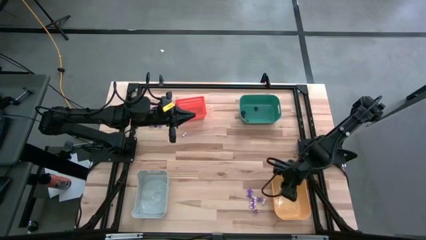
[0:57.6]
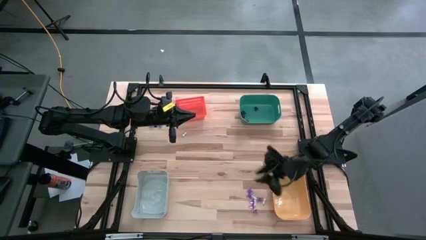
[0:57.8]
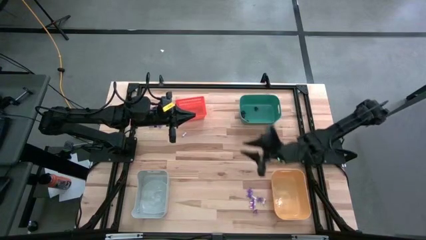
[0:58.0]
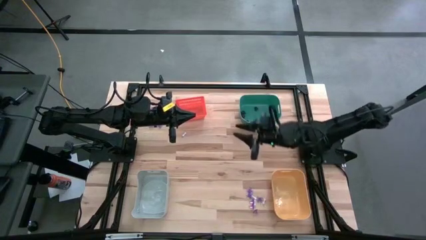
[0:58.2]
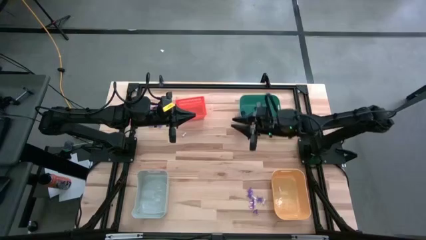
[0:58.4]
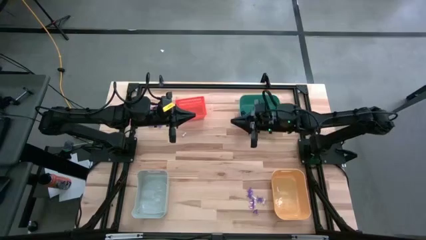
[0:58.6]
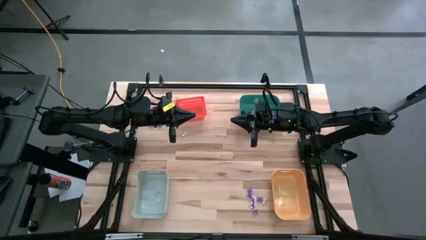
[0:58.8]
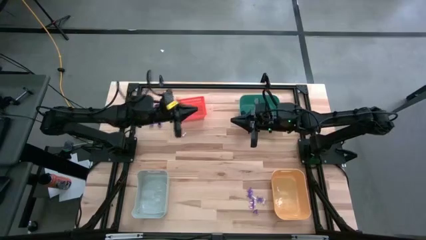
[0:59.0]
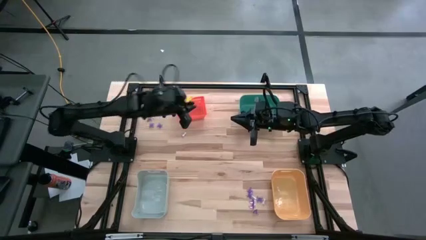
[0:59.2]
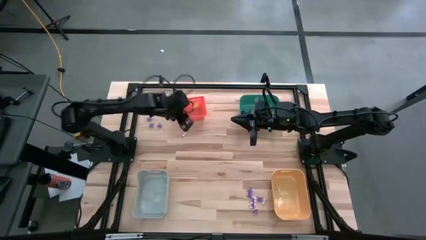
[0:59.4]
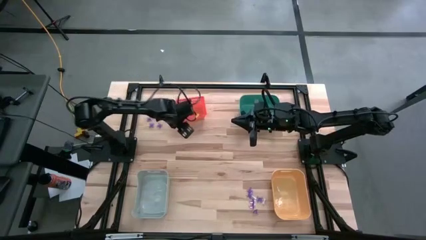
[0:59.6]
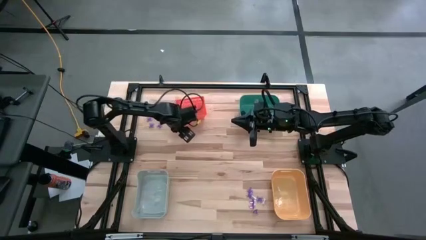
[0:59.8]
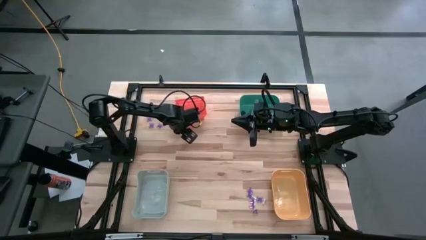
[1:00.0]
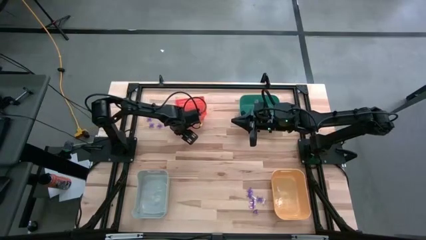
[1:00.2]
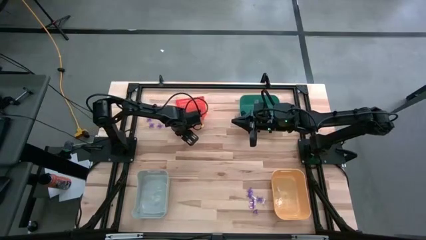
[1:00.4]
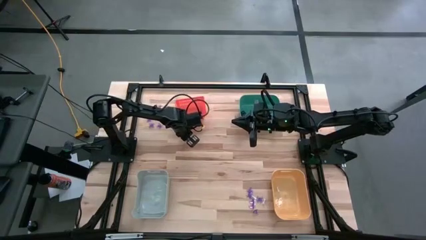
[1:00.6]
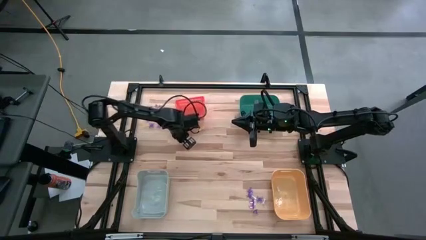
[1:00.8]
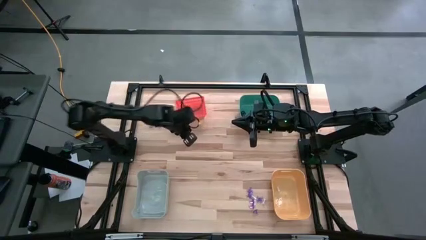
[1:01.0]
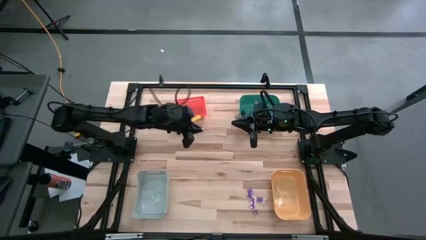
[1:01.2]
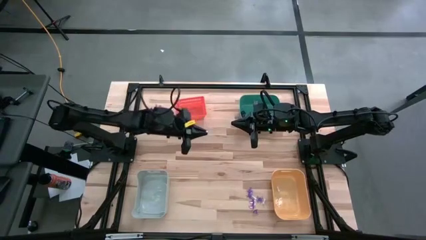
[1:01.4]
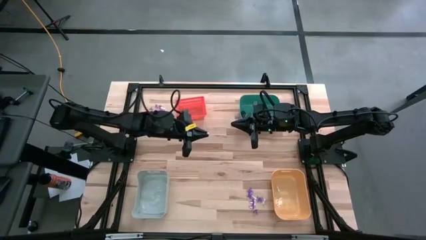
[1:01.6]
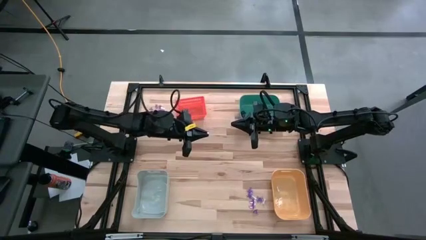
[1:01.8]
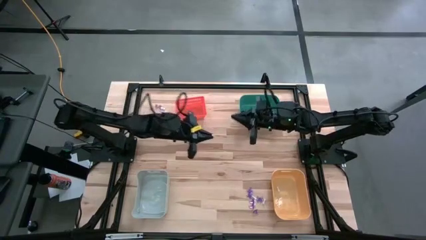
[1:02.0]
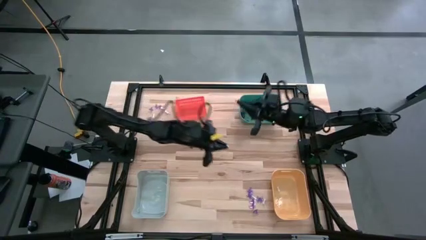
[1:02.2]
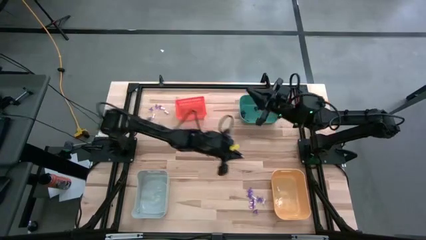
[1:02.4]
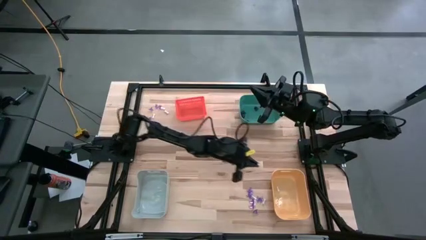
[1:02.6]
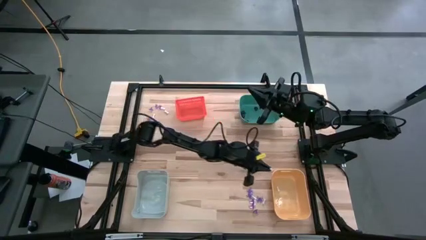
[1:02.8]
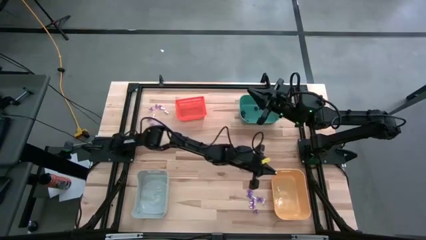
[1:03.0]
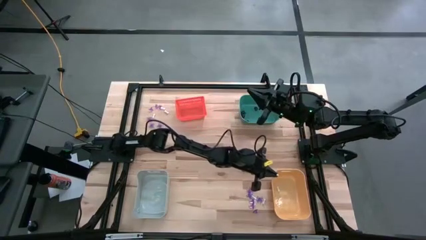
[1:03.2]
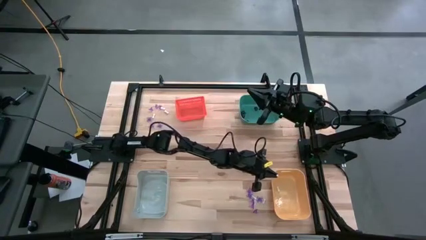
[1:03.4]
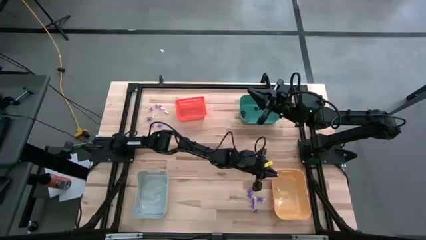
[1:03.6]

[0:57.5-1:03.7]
Task: Sort Halloween decoration
Put the white bone toy into the yellow bin

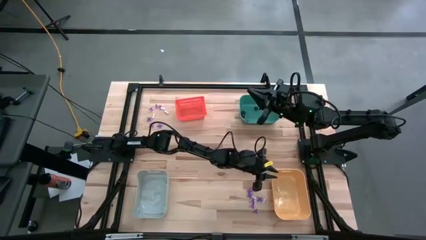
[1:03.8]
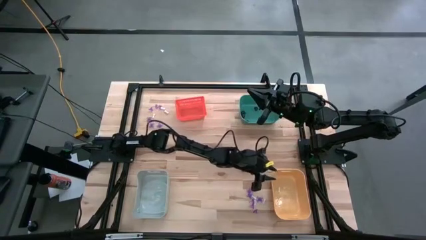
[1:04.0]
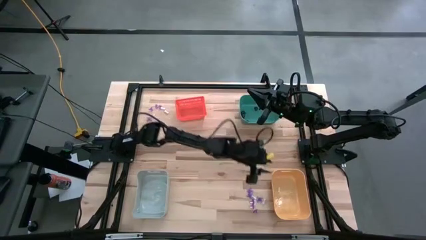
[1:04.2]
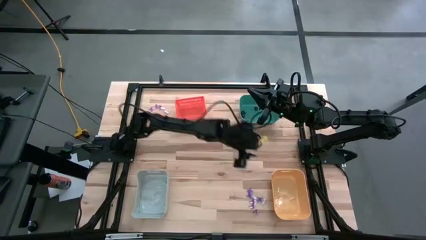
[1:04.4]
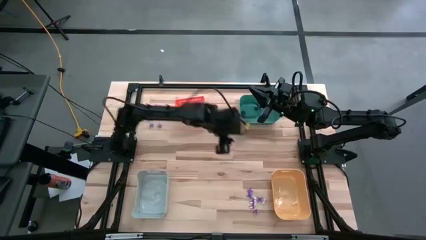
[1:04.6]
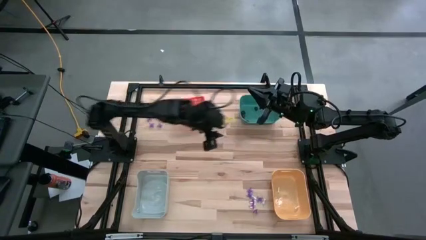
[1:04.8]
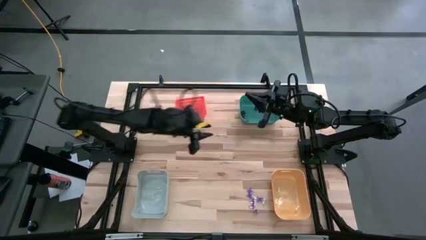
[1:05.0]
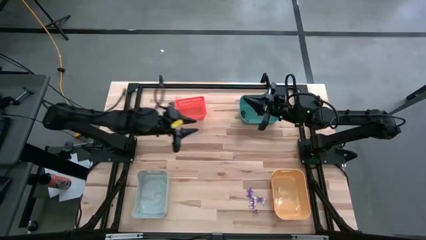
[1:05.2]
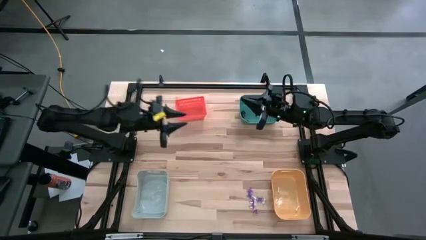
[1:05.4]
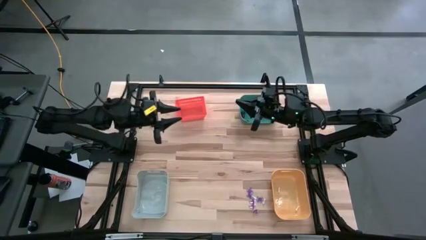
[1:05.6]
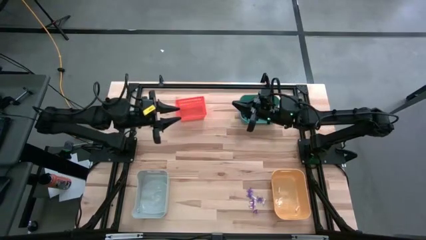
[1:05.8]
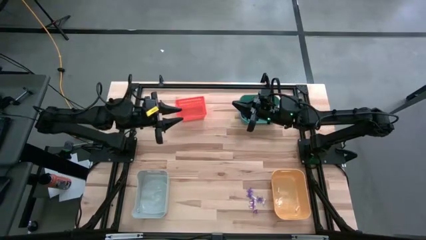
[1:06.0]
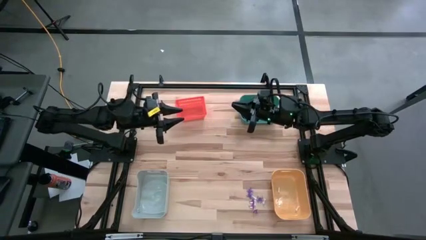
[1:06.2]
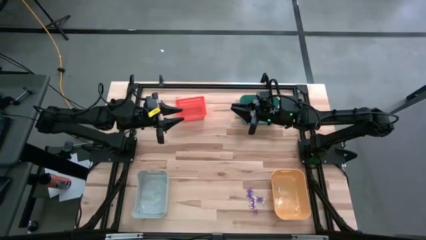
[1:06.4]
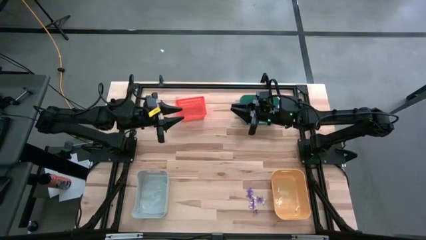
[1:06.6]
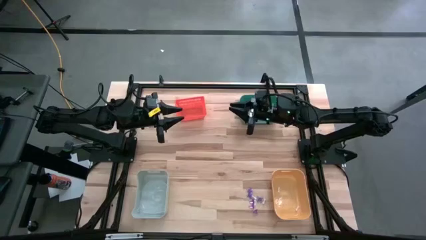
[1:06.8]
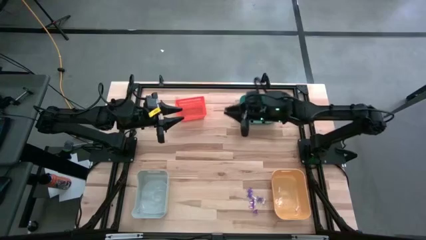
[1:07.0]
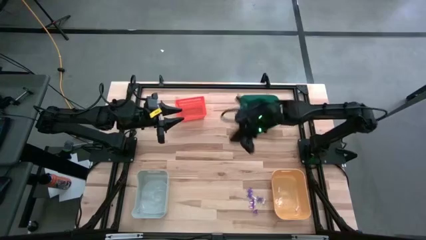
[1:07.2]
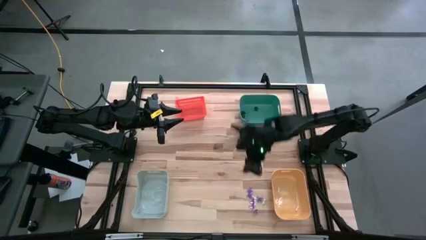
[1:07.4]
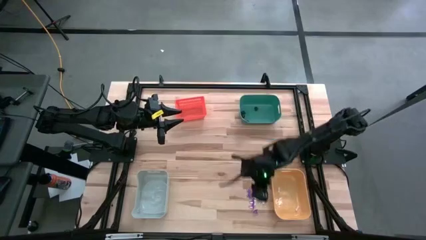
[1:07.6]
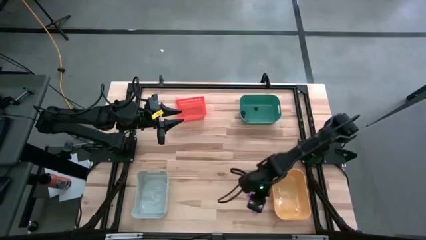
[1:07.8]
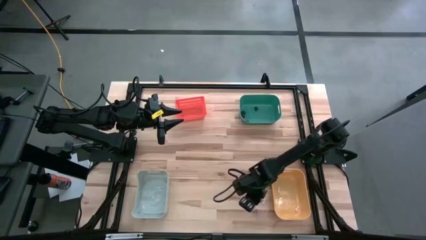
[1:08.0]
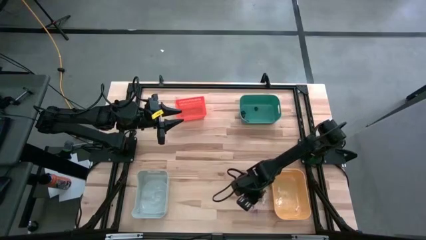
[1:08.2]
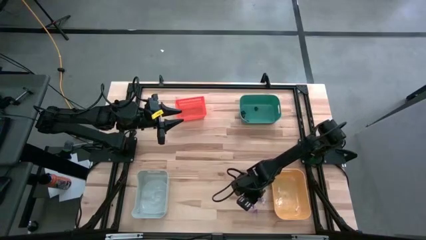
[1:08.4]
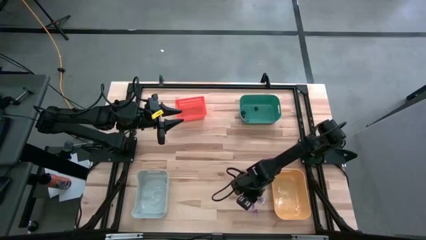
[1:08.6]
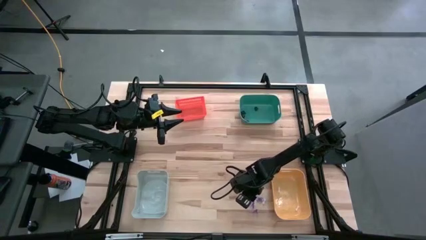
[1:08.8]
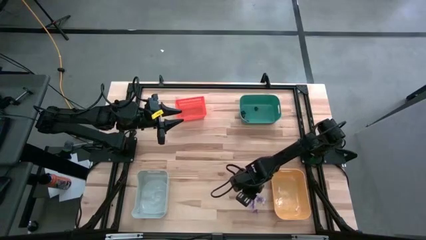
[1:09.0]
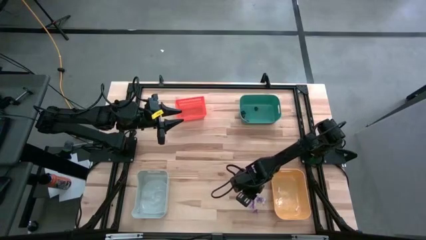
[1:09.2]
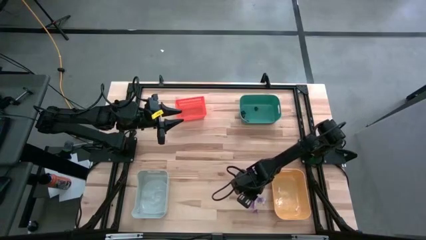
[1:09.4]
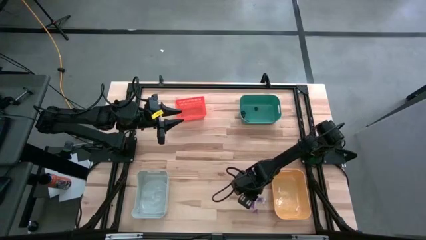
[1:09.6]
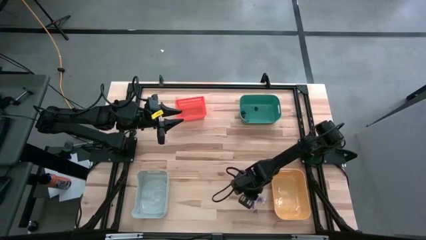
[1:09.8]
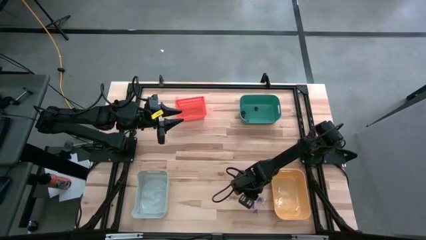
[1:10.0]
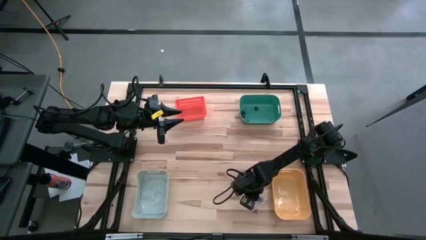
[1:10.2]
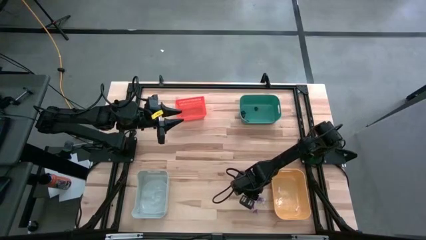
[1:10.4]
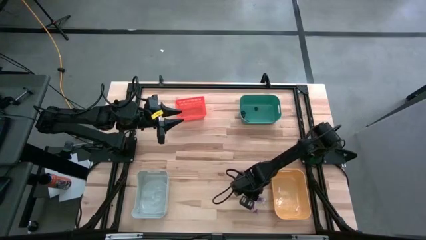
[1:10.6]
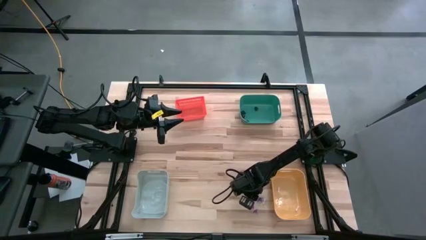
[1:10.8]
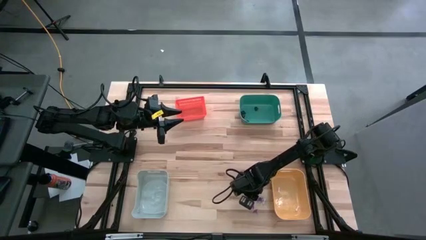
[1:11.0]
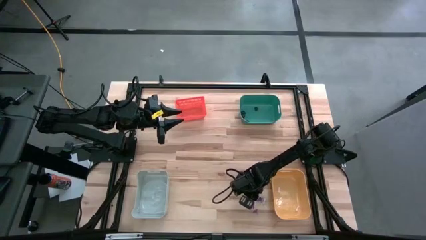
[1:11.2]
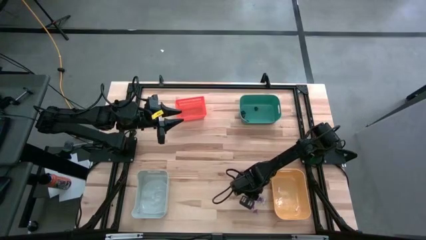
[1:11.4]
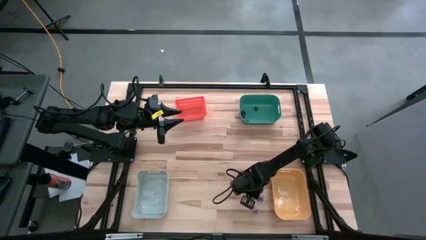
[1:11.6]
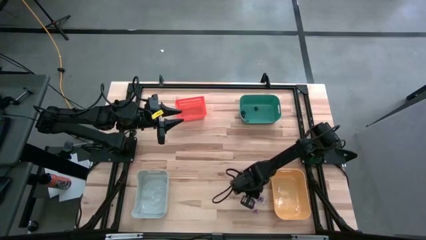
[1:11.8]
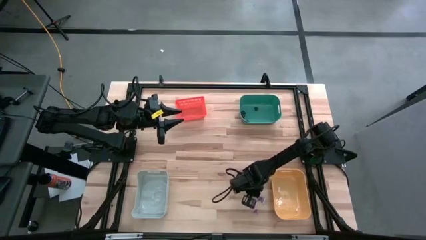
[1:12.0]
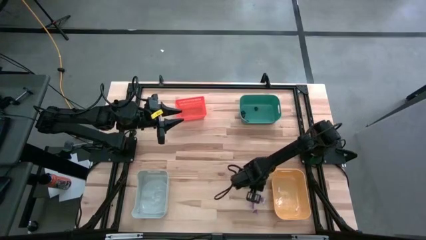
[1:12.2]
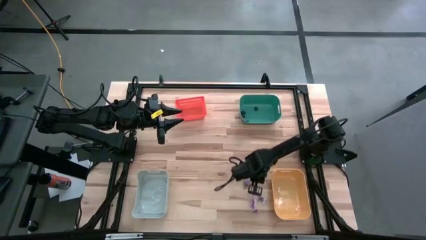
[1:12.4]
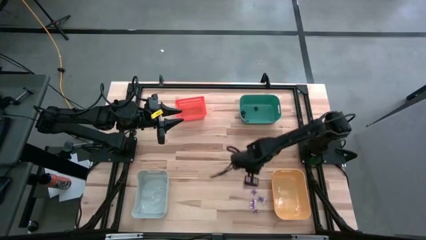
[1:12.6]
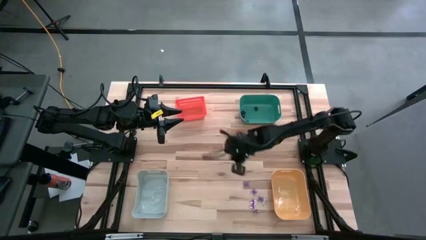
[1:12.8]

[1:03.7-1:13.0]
Put the white bone toy into the yellow bin
